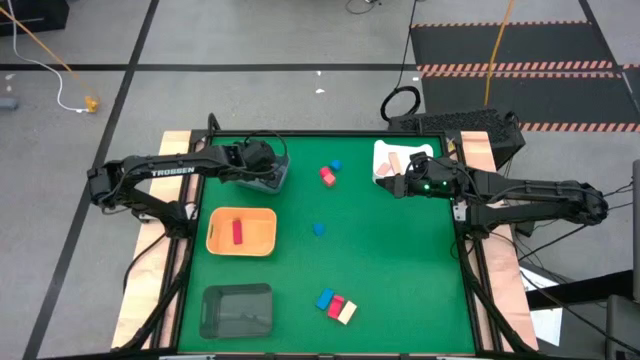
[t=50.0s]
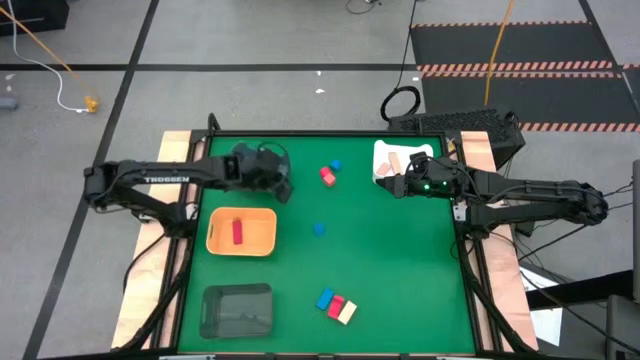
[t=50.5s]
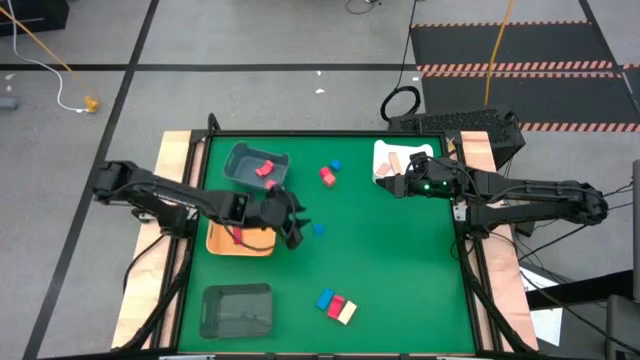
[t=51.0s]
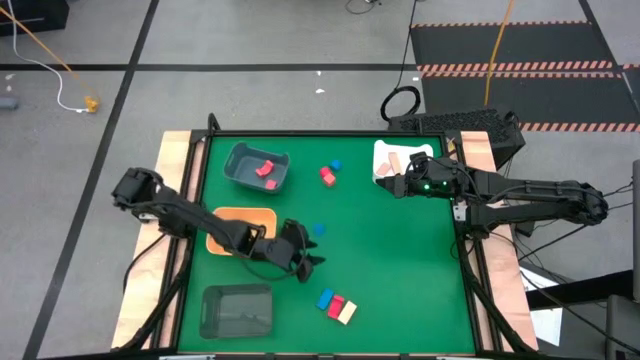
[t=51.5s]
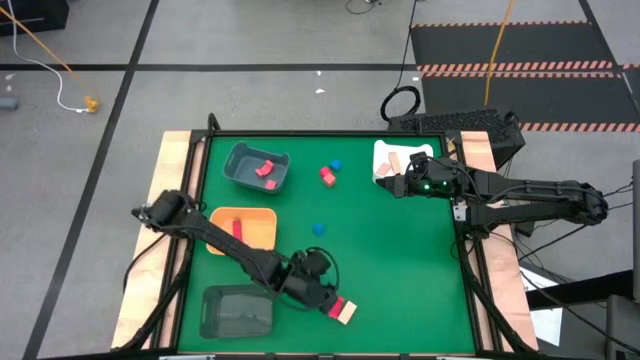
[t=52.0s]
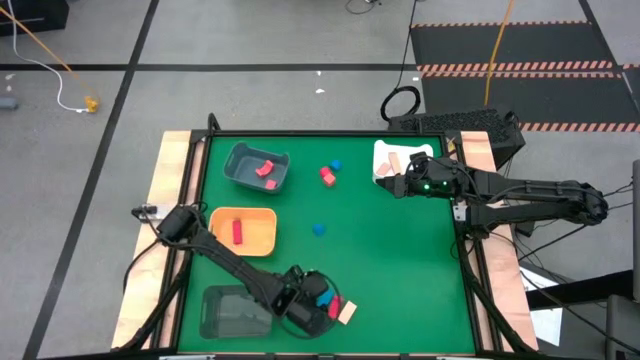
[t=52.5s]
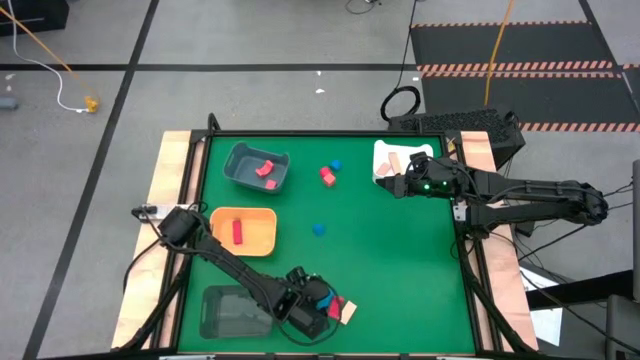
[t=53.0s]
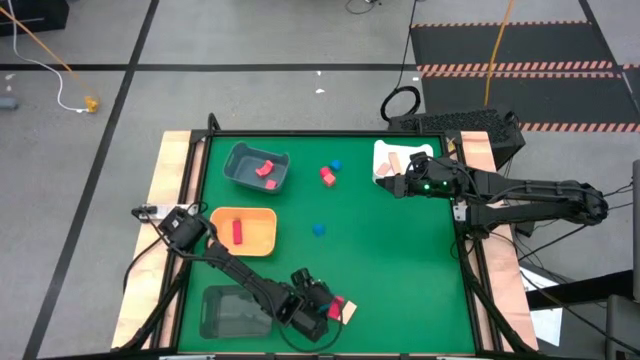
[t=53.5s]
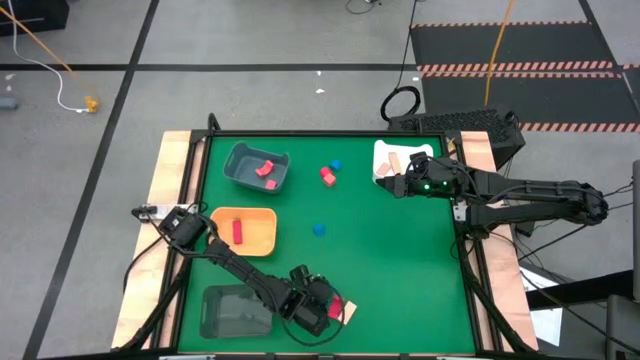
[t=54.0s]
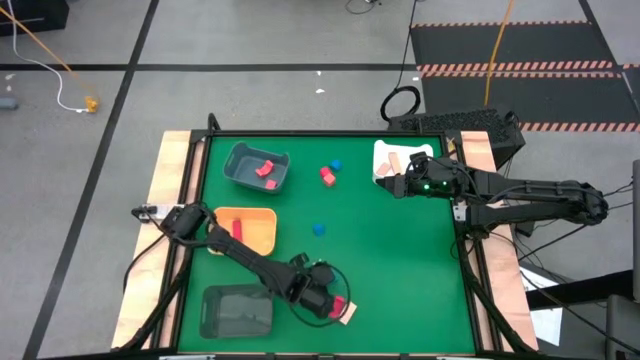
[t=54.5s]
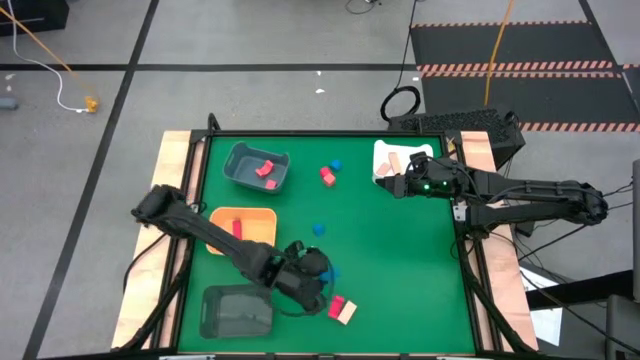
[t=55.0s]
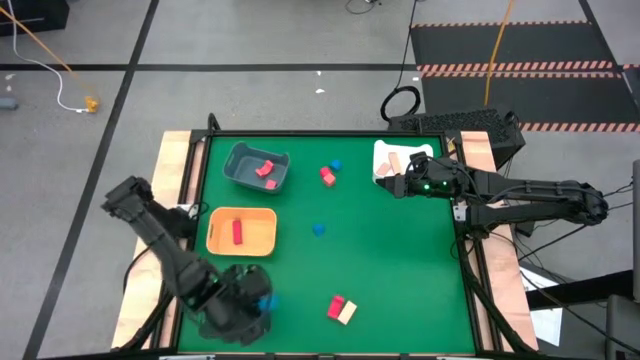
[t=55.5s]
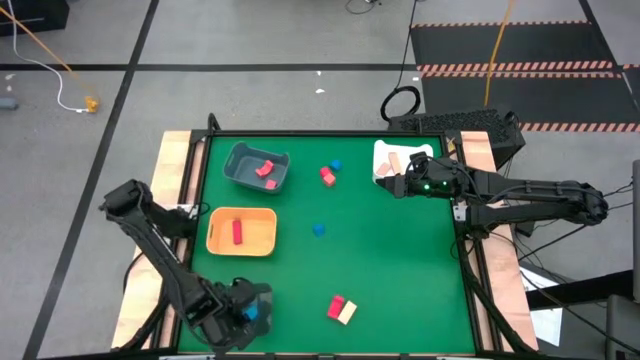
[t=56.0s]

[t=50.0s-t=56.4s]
Task: Sort & place blocks by color
Put the bottom blue block into the black bin

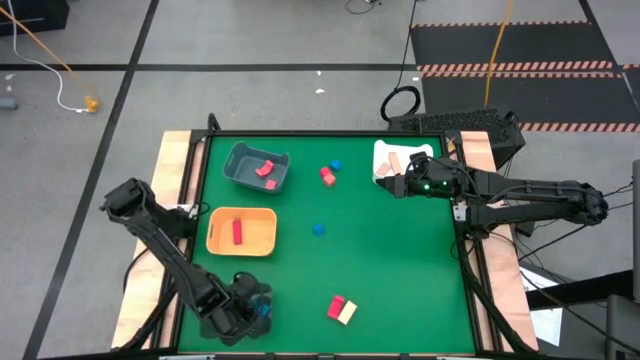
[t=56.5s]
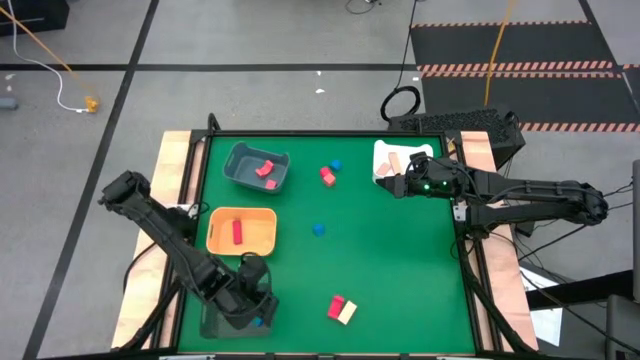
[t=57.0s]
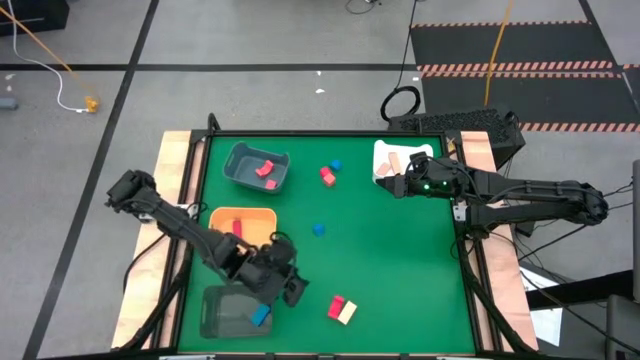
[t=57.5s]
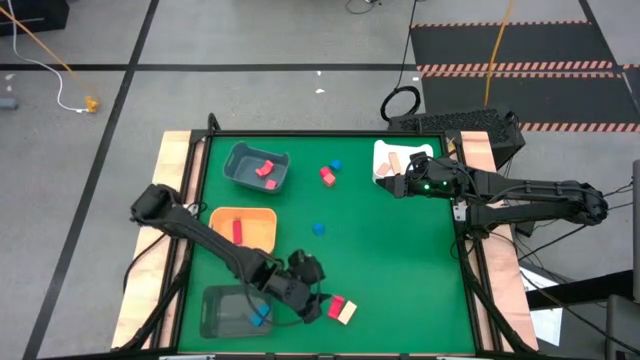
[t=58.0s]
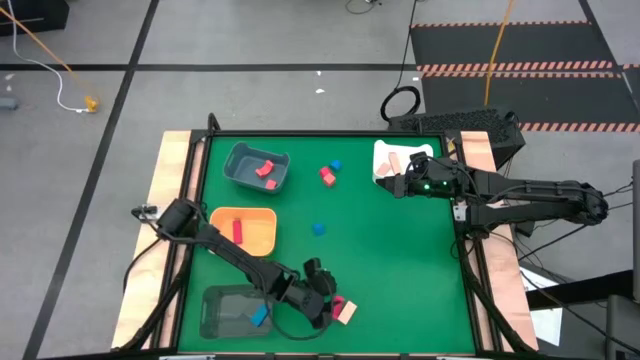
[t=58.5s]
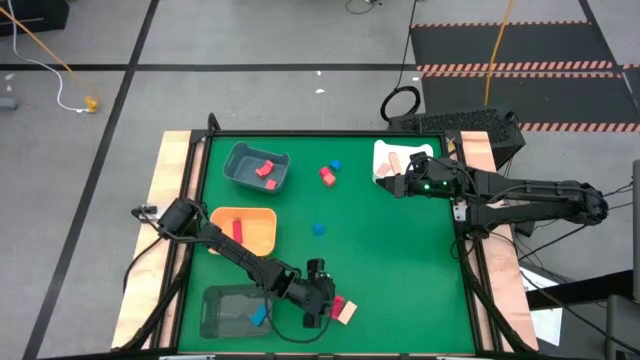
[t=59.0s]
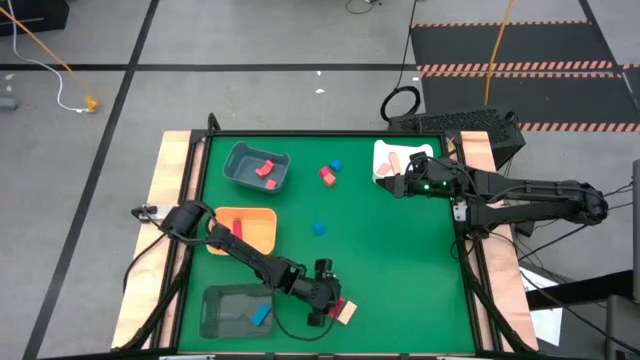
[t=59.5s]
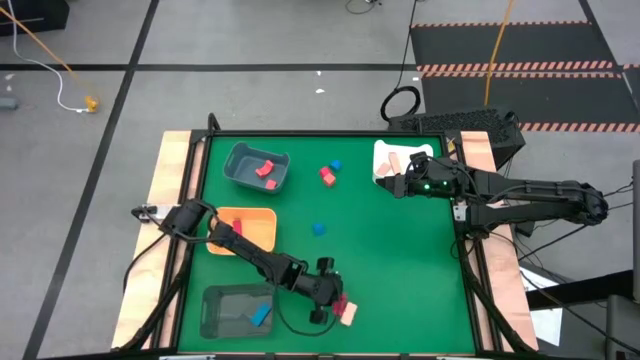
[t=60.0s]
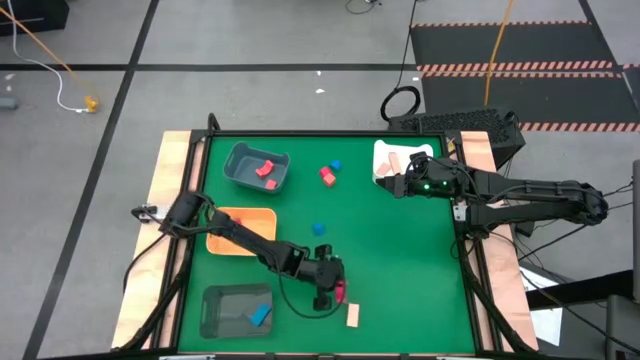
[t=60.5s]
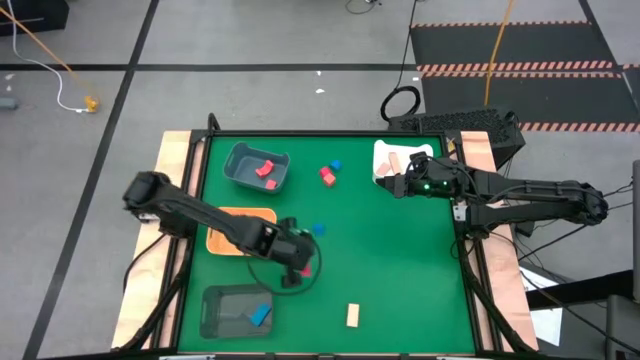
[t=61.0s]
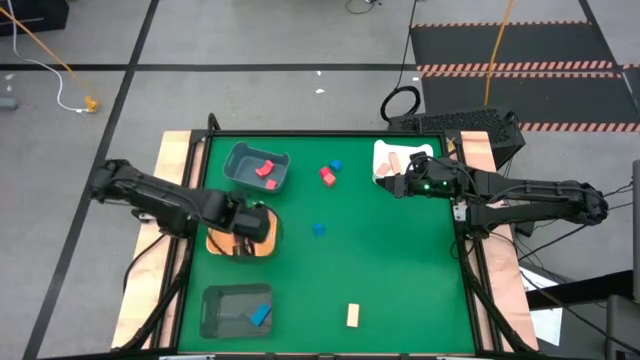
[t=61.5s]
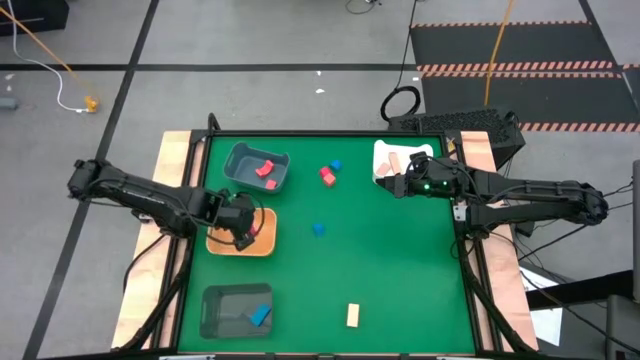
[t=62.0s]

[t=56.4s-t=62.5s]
Put the bottom red block into the yellow bin

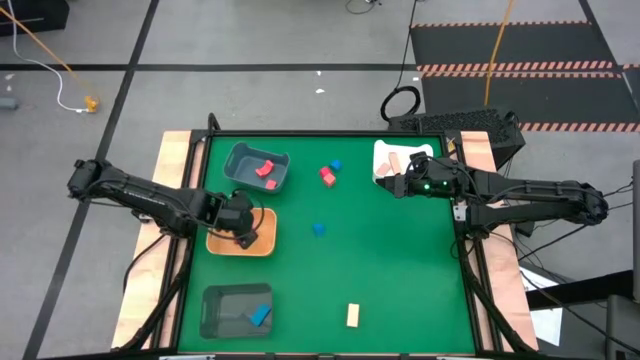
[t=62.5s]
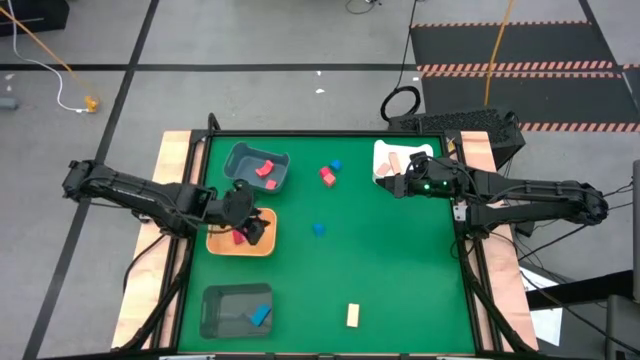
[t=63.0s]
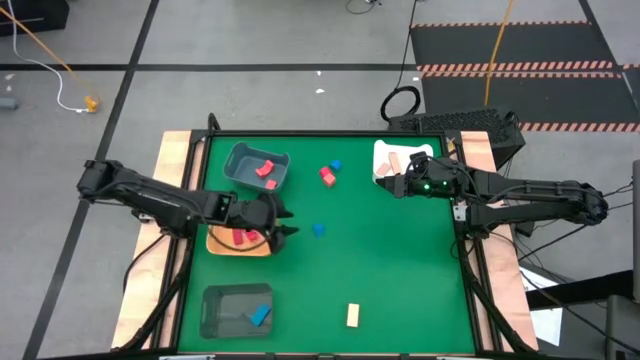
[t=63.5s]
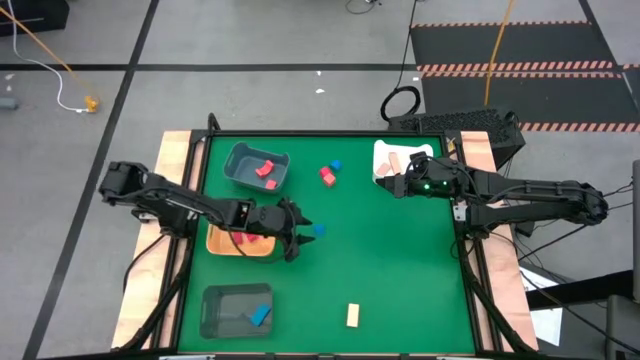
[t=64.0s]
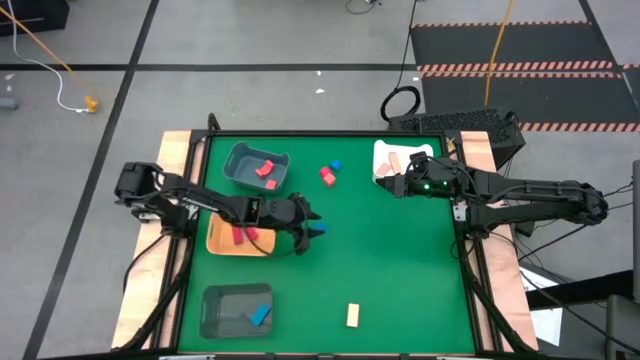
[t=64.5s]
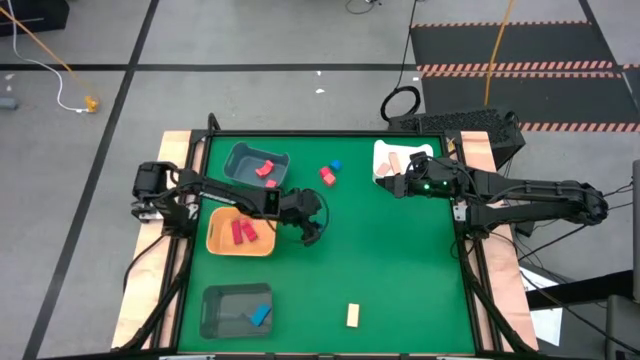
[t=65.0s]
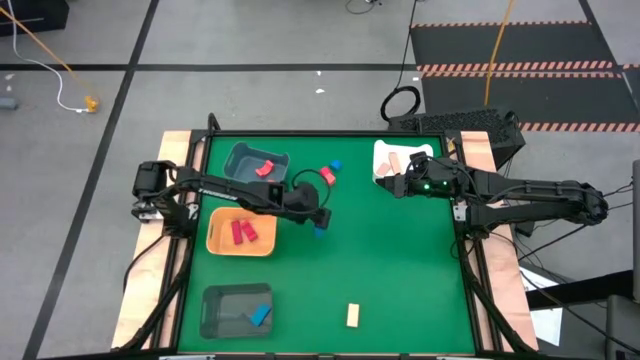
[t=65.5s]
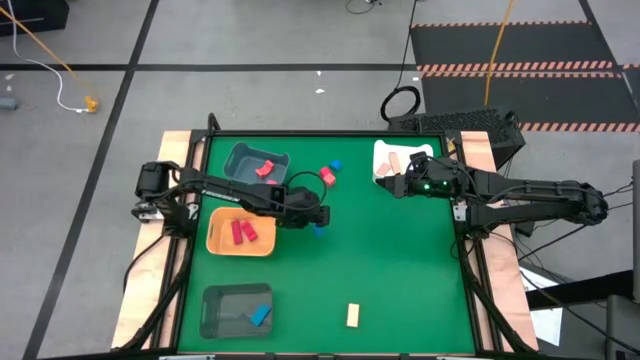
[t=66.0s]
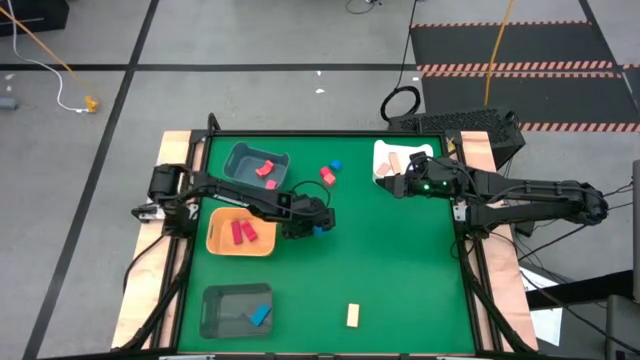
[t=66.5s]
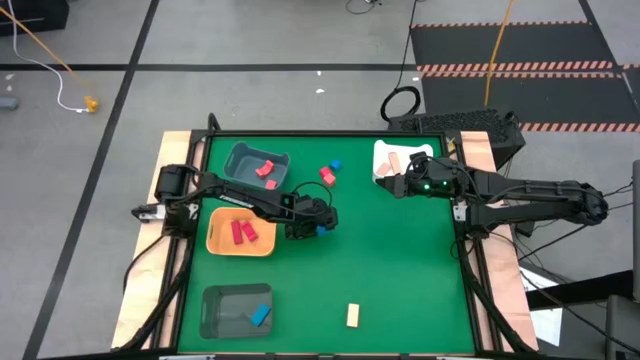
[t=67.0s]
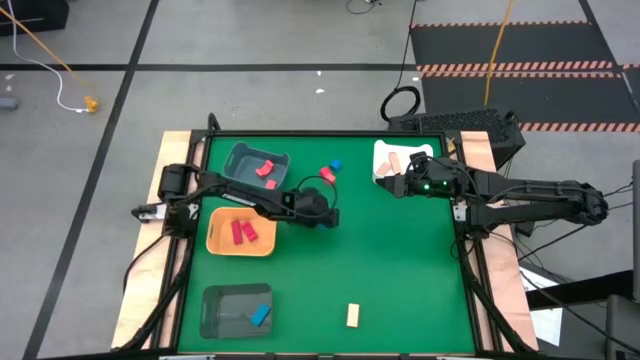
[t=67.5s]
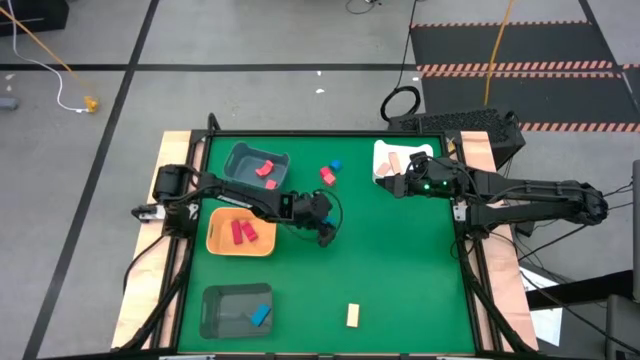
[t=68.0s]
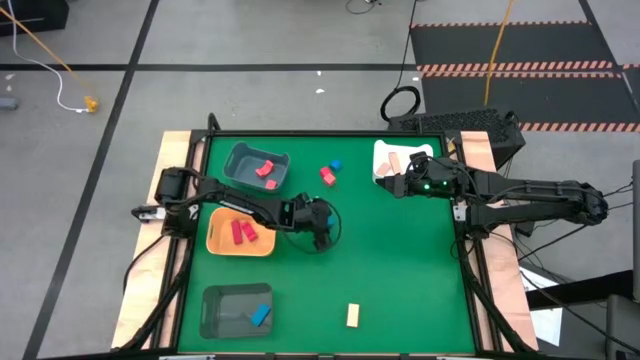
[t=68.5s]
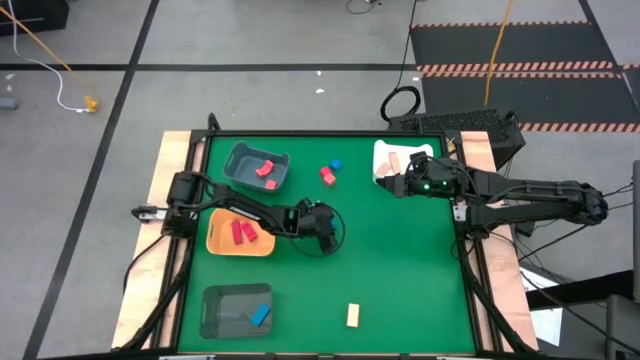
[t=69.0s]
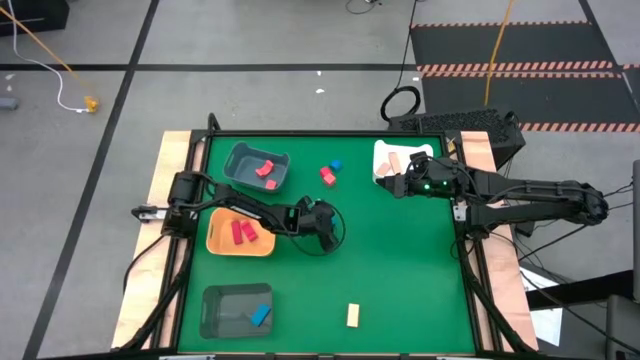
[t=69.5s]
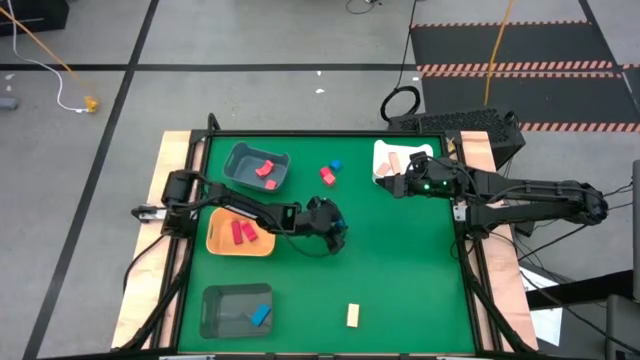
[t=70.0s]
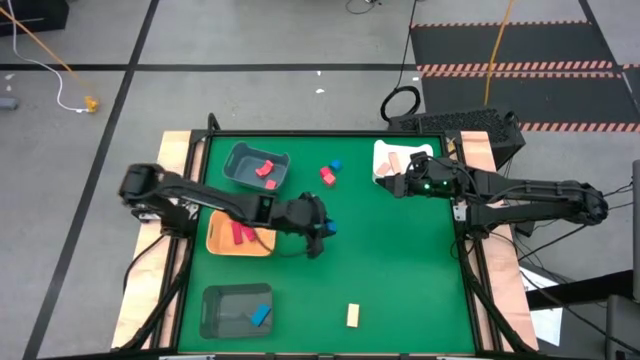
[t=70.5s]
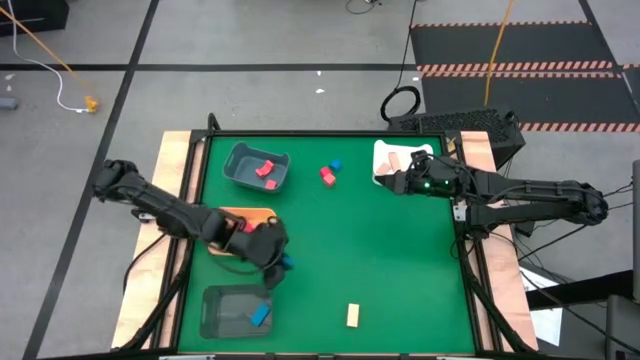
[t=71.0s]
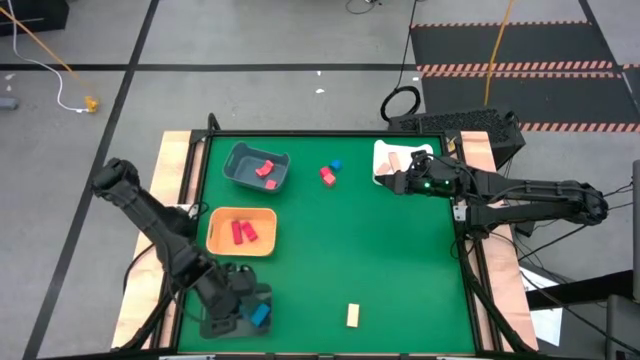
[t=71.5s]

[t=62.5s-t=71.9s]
Put the bottom blue block into the black bin
